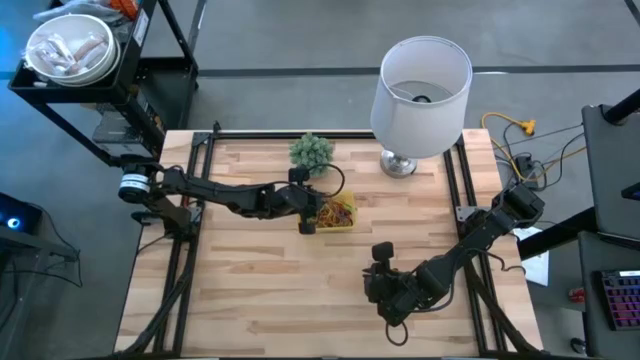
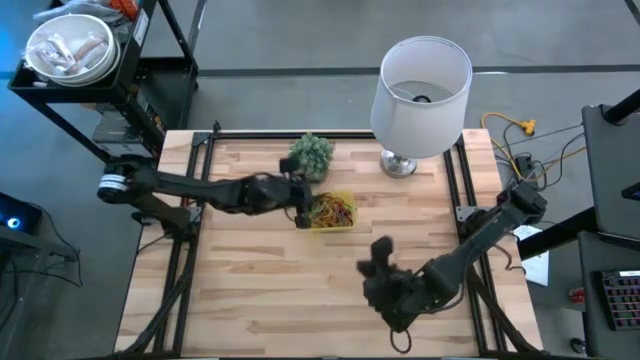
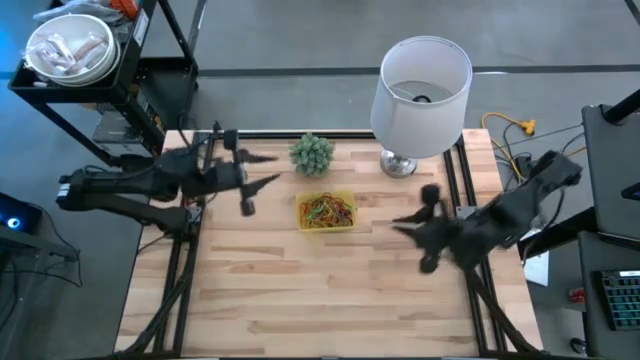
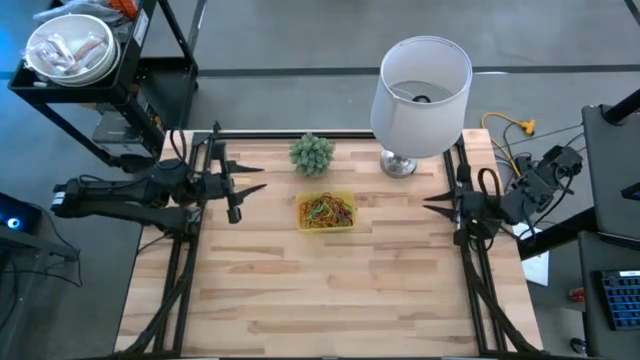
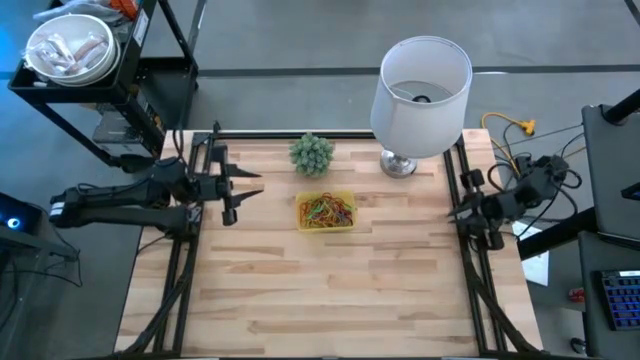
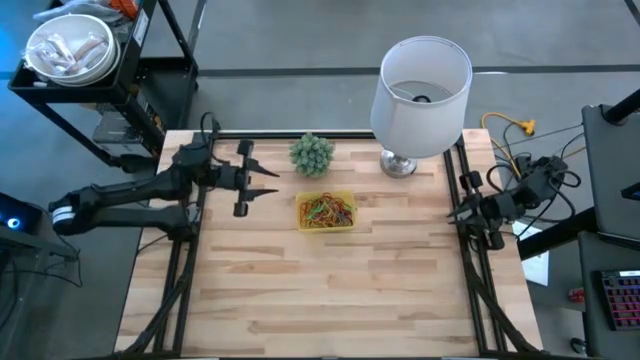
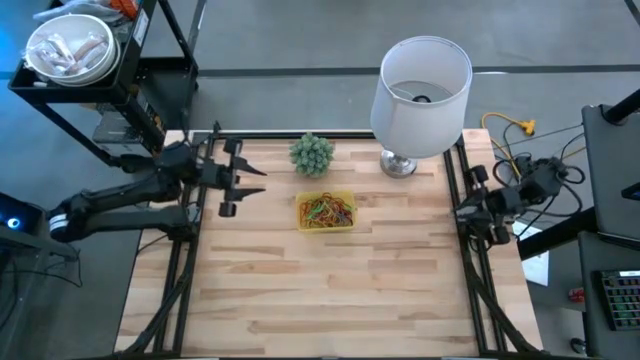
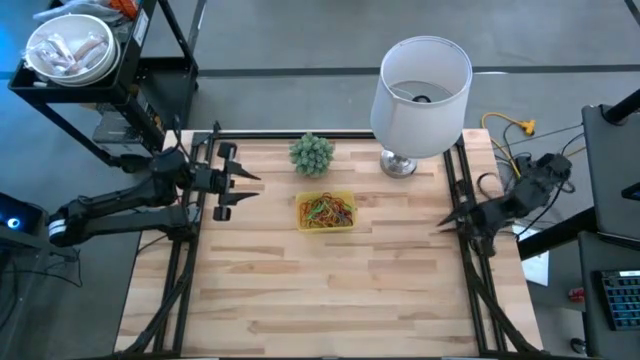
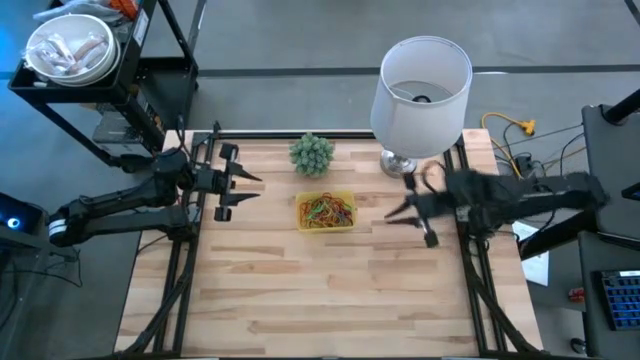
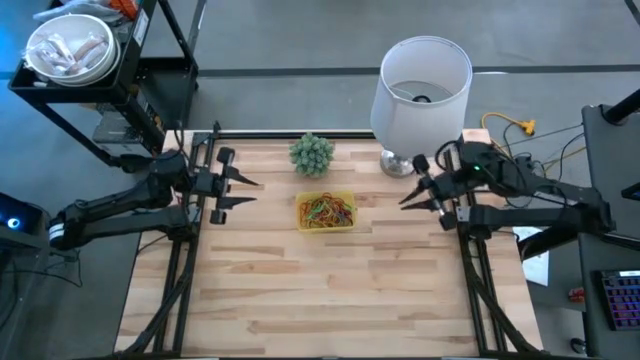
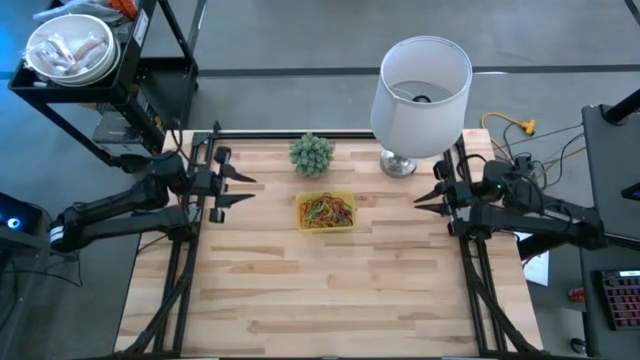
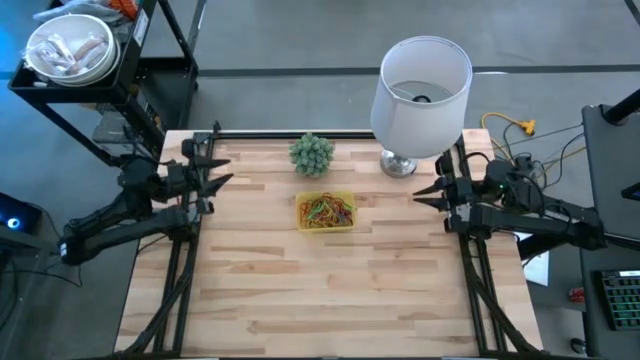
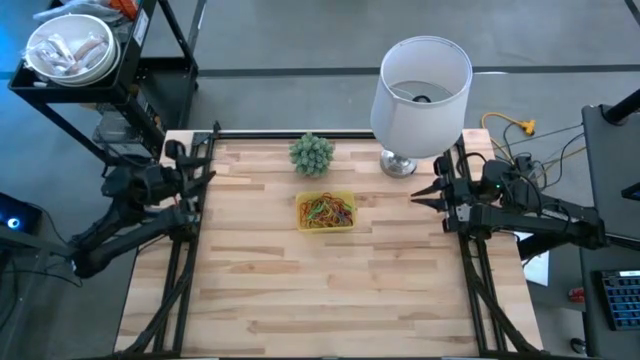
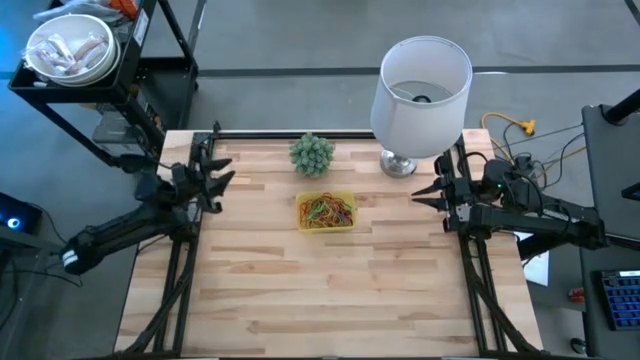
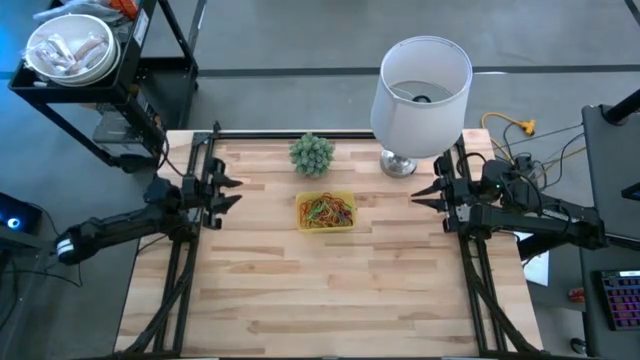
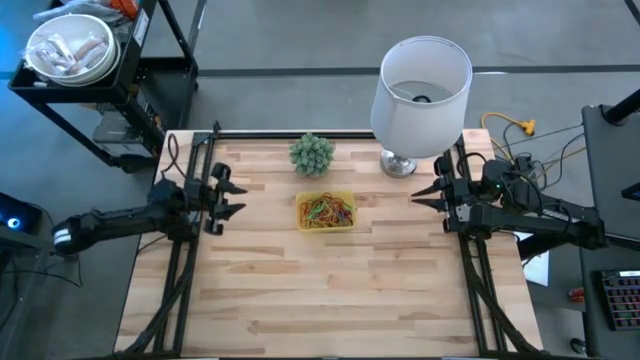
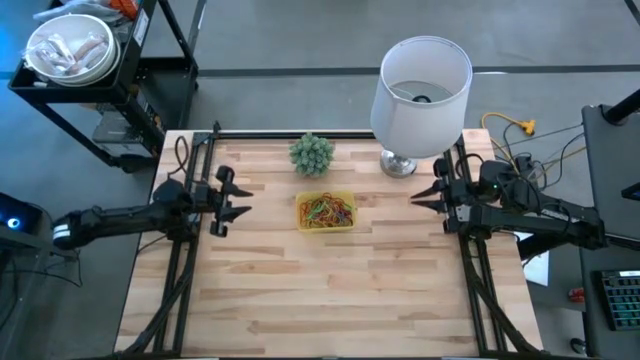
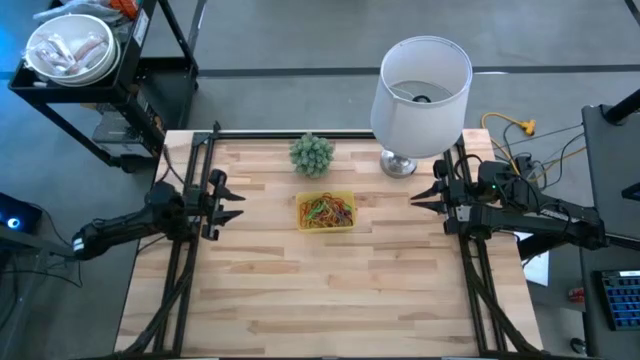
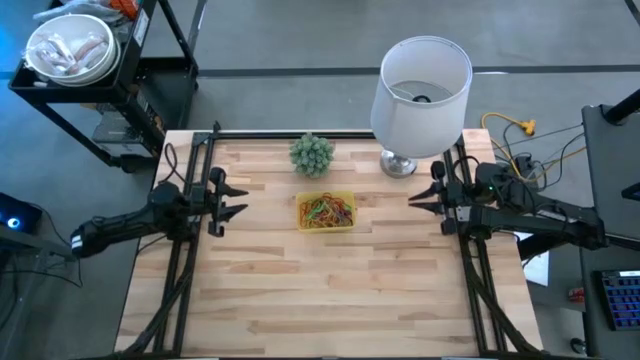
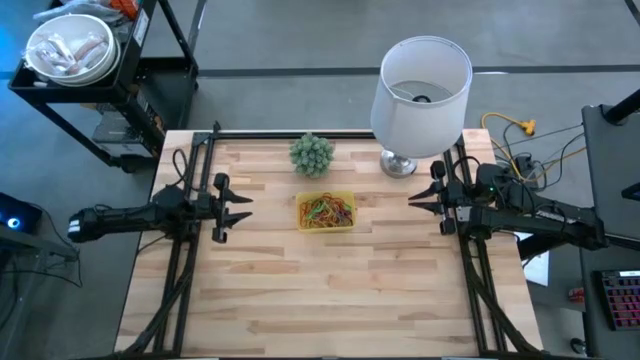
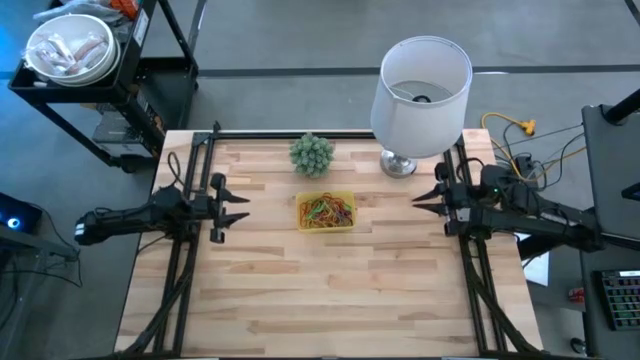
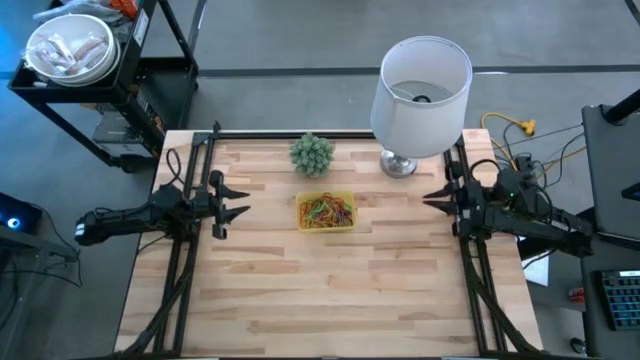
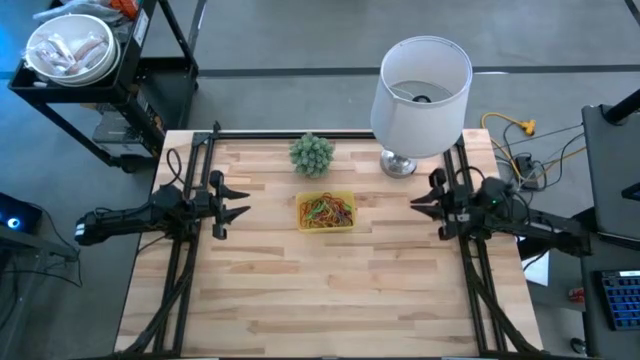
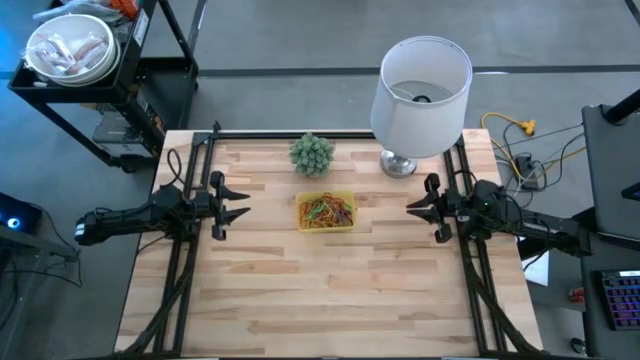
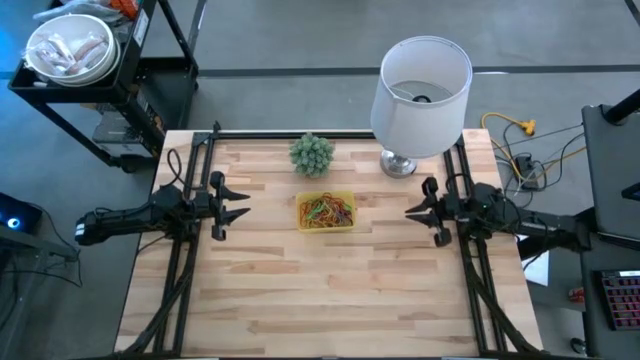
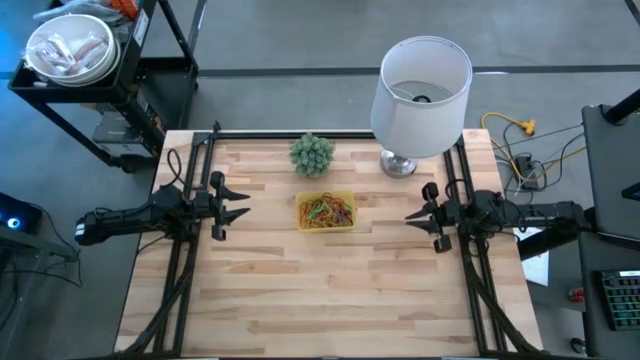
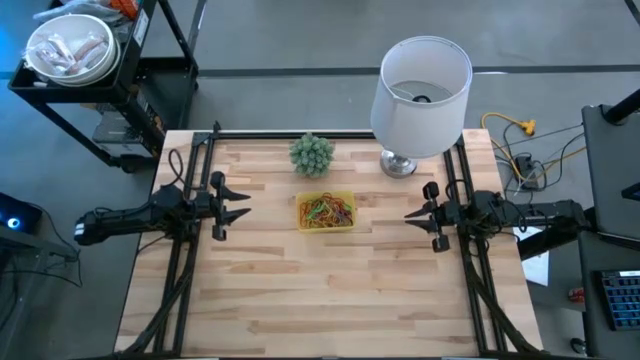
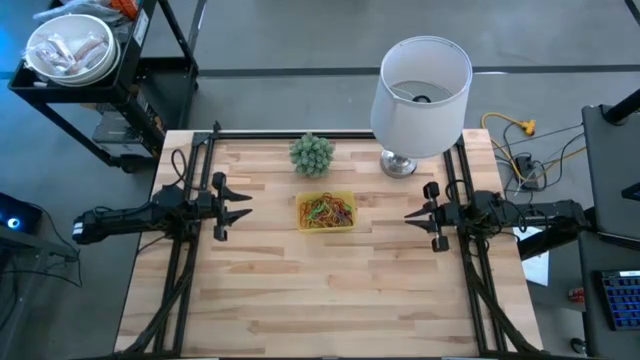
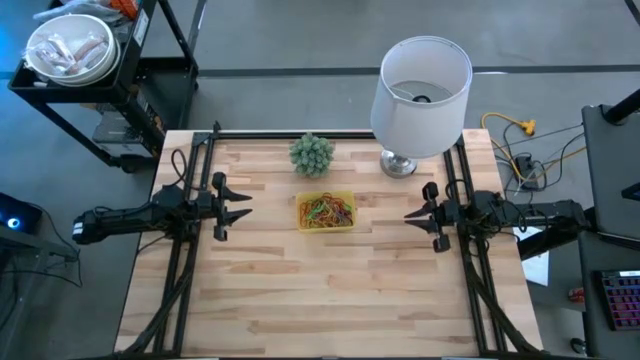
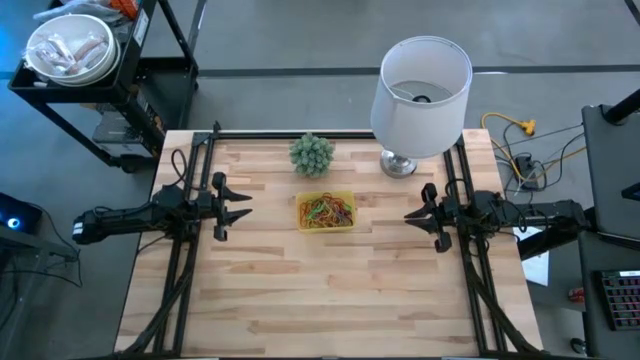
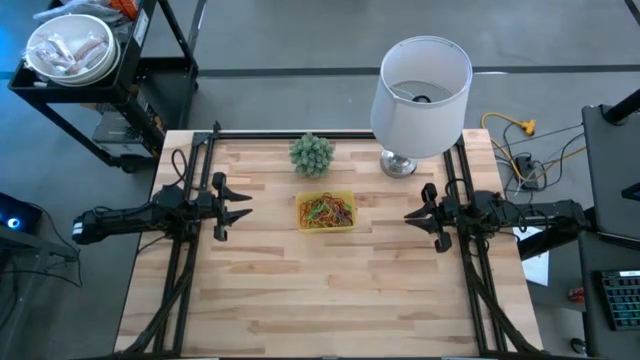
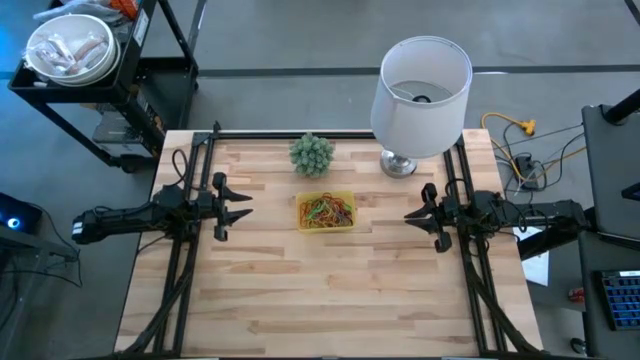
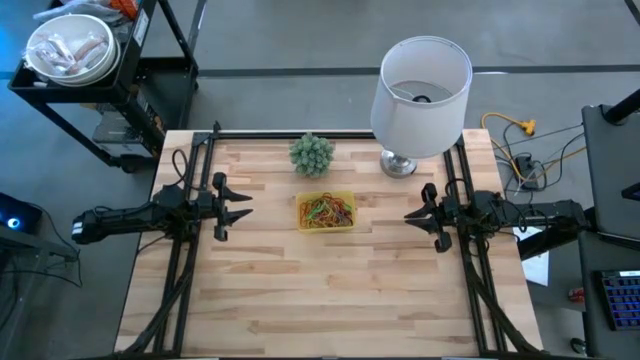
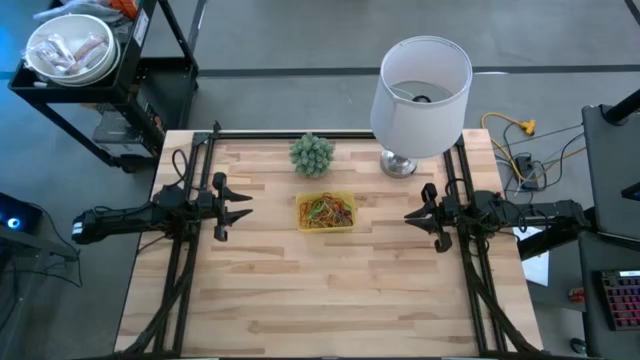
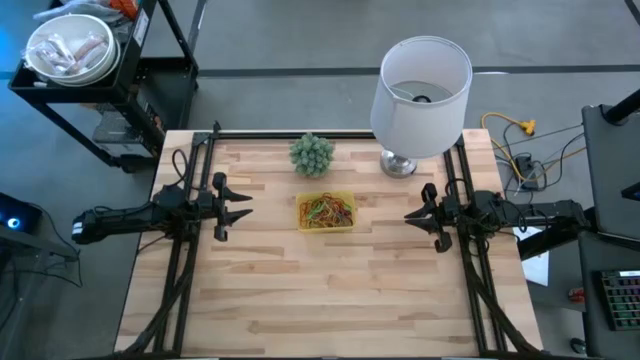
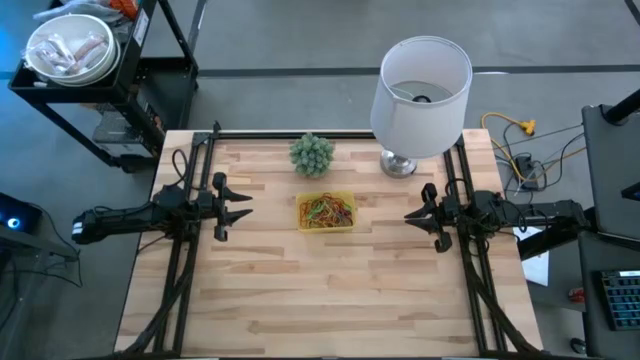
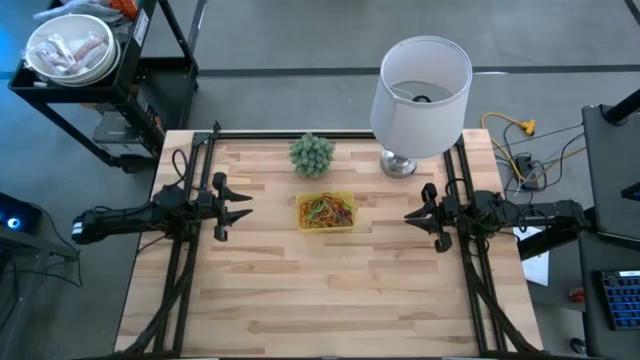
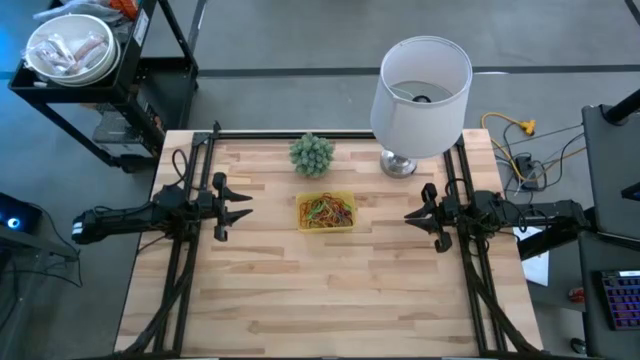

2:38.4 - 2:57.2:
Task: Pick and place rubber bands into bin
Return to Home Position

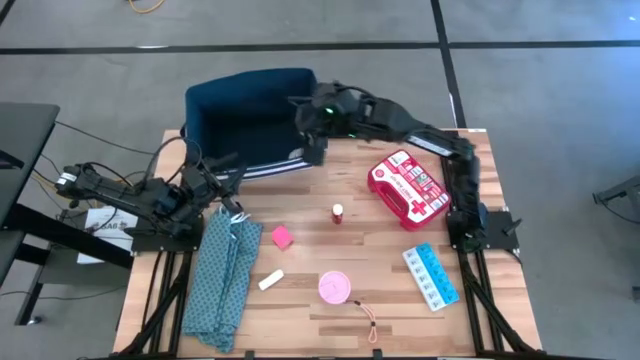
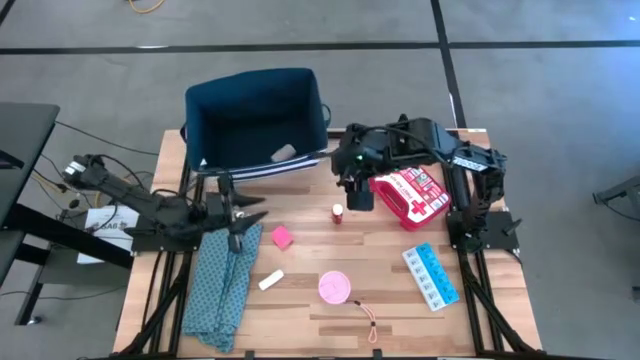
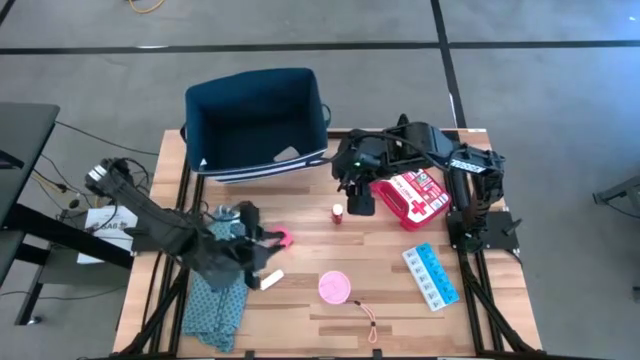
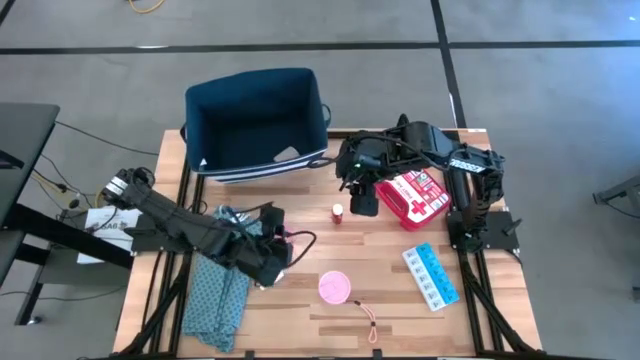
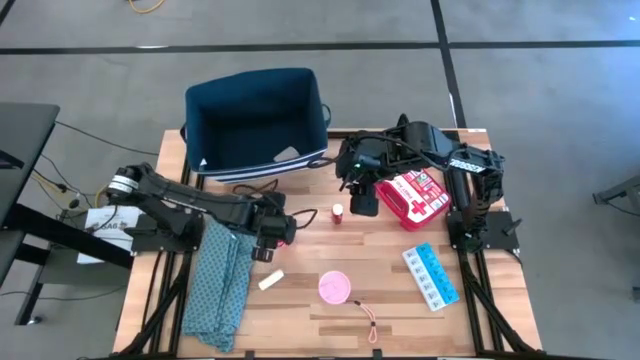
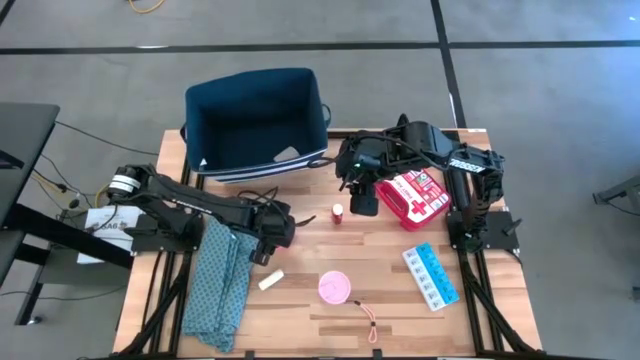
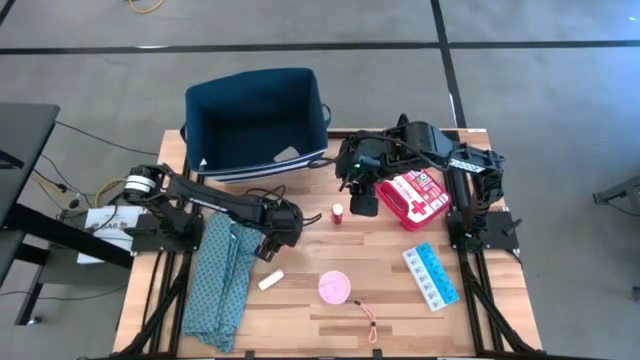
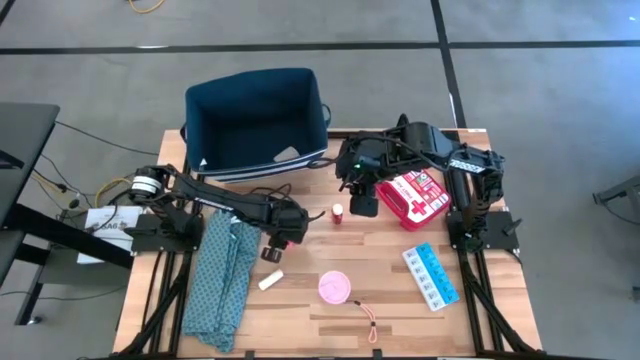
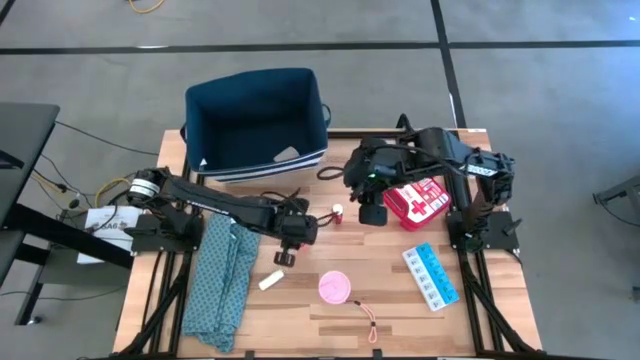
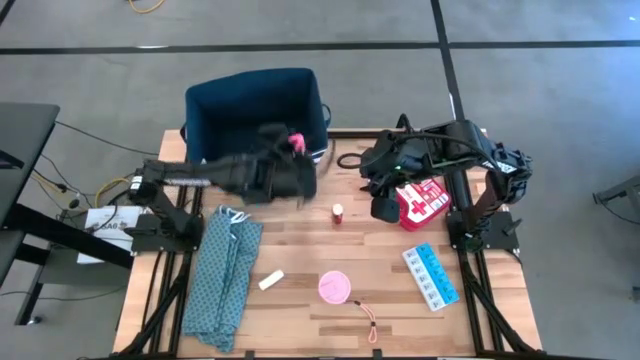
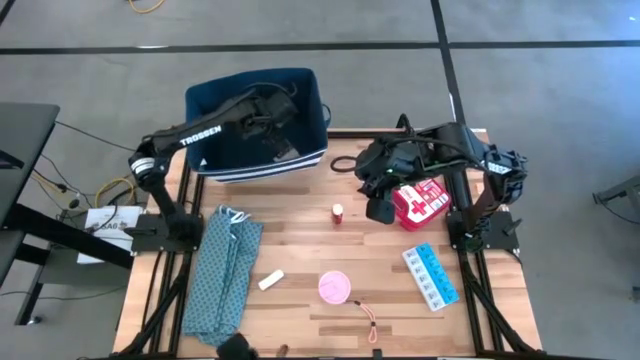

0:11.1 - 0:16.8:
Task: Pick & place medical supplies in basket/bin
Put the pink rolled bandage into theblue bin
